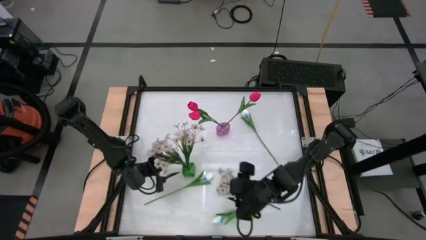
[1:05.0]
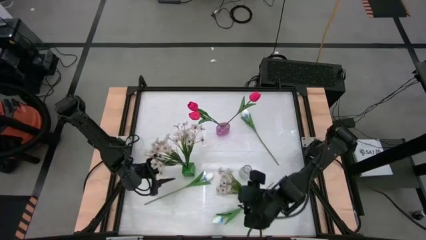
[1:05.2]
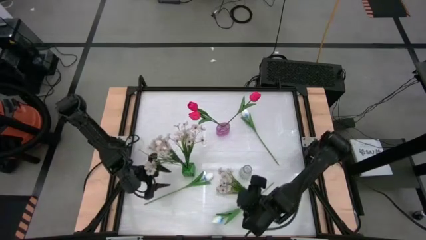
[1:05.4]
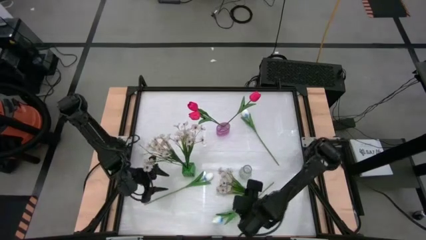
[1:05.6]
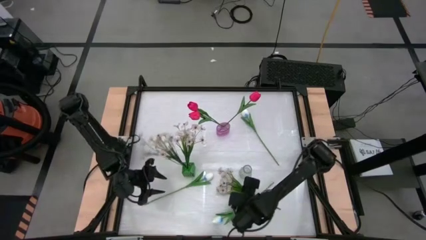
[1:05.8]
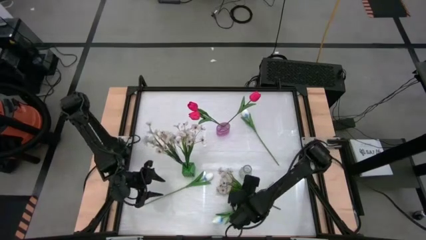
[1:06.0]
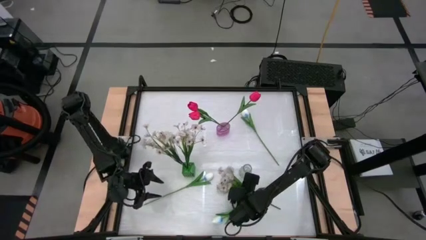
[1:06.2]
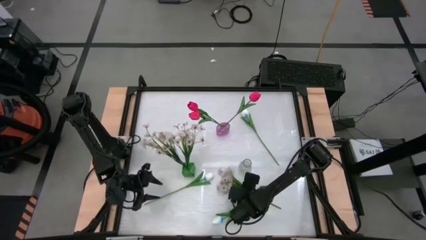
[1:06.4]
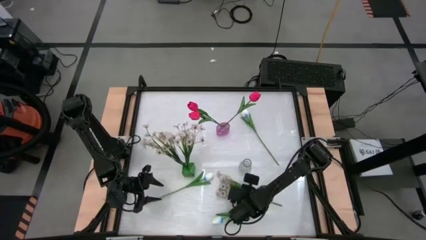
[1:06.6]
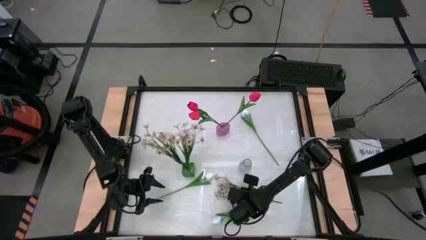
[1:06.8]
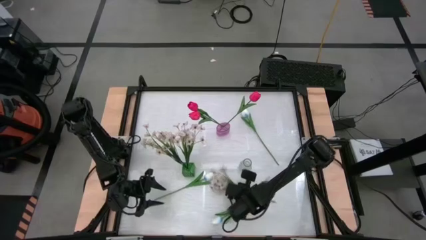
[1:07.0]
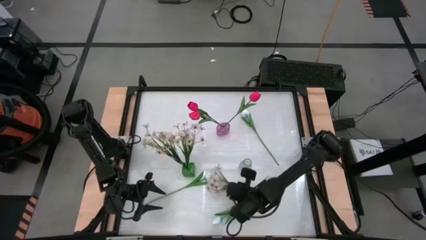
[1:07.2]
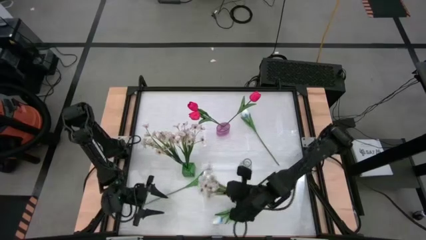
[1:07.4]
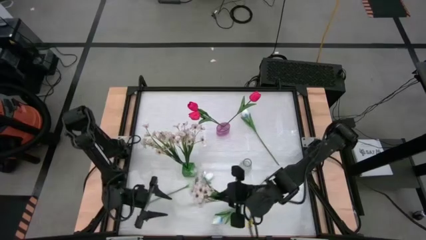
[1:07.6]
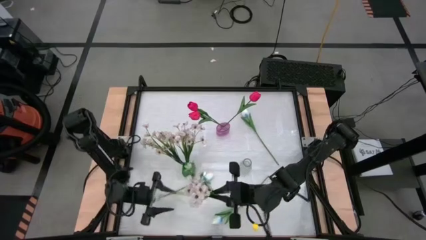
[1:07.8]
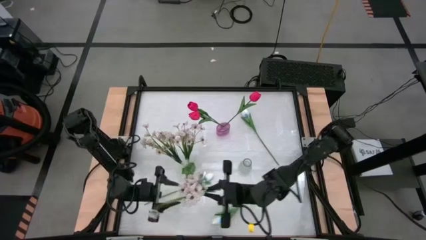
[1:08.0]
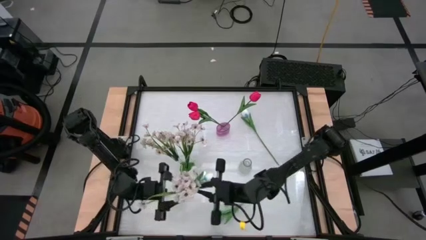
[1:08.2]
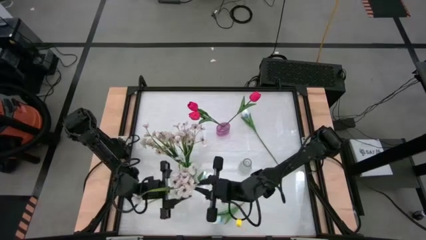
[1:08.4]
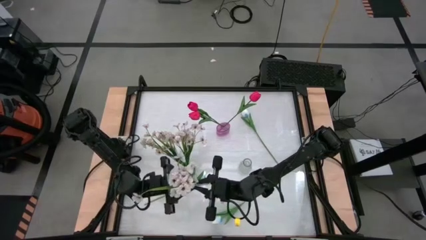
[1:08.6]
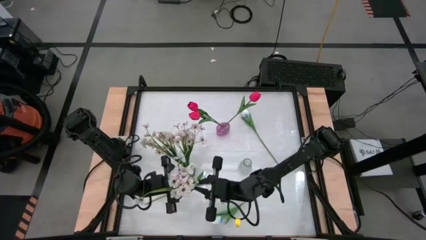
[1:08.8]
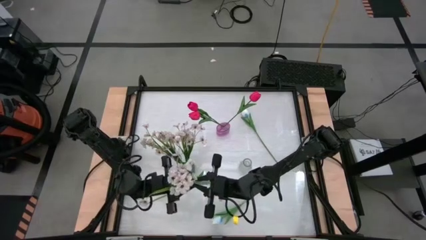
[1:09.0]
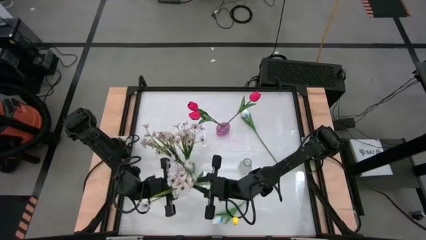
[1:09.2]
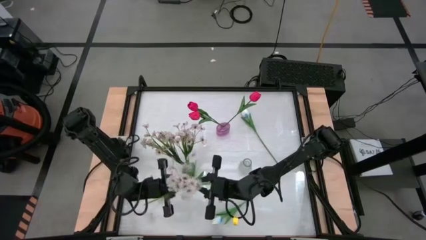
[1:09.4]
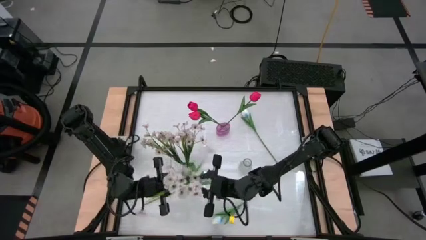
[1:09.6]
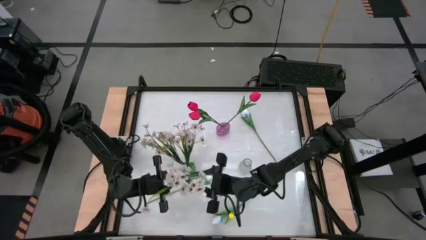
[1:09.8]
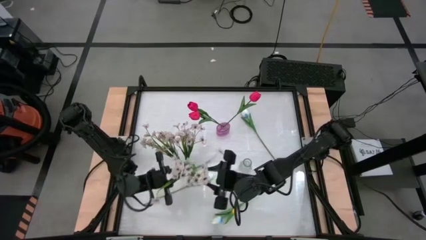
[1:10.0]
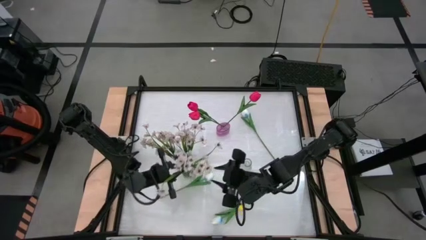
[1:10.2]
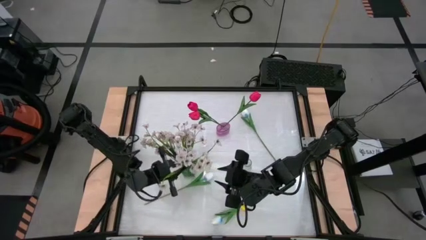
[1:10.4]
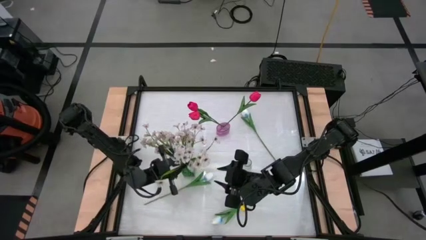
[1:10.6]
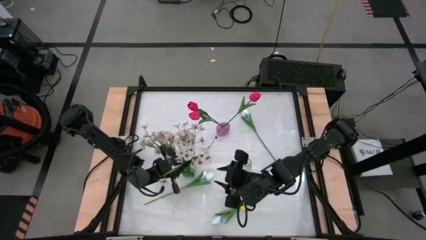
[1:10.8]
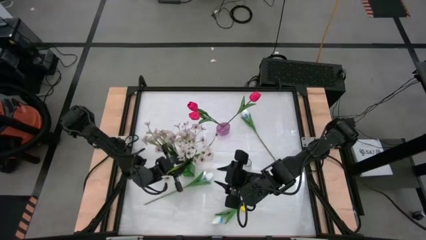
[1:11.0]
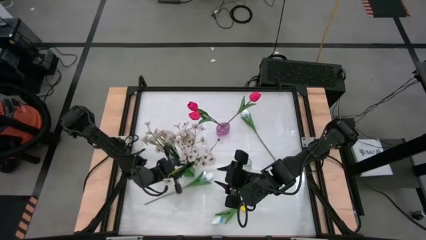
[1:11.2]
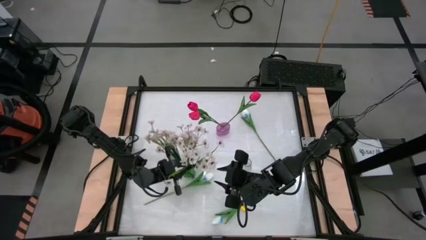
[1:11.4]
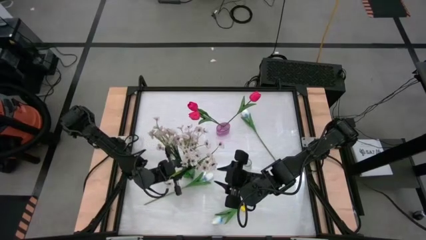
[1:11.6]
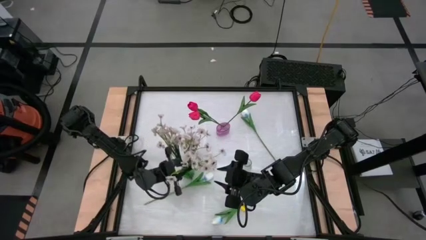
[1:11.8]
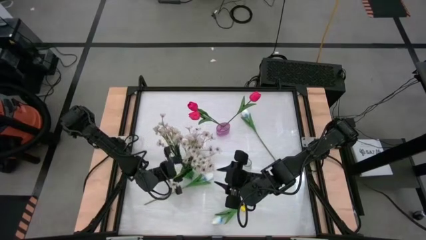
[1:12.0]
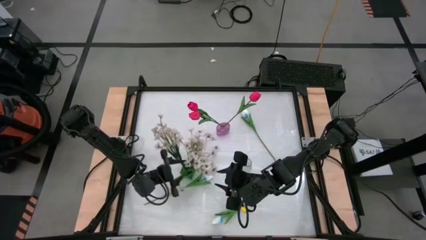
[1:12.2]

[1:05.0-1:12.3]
Task: Sort flowers into vase by color
Put the white flowers into the green vase

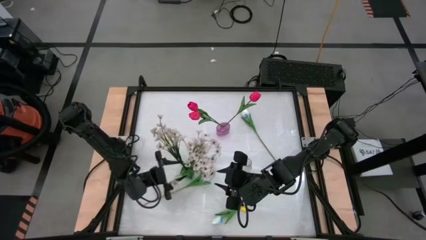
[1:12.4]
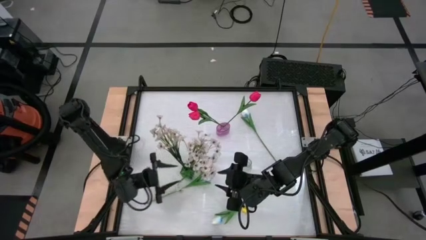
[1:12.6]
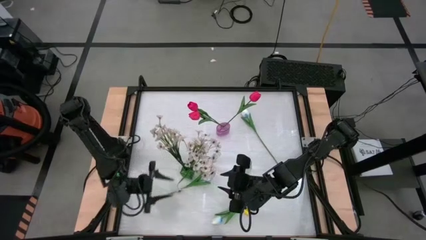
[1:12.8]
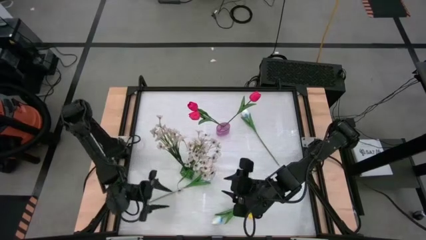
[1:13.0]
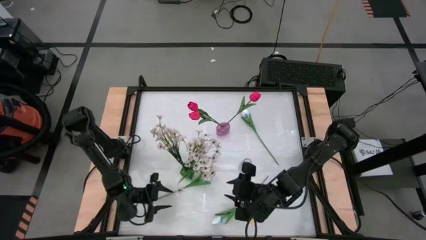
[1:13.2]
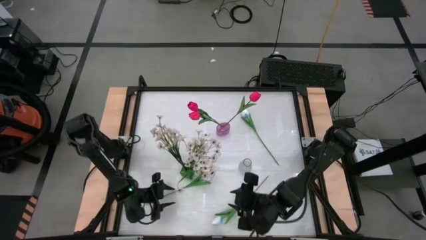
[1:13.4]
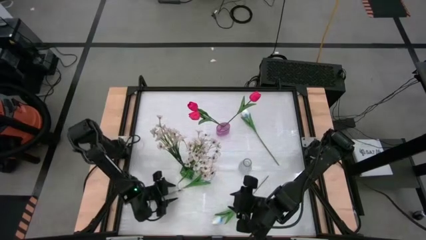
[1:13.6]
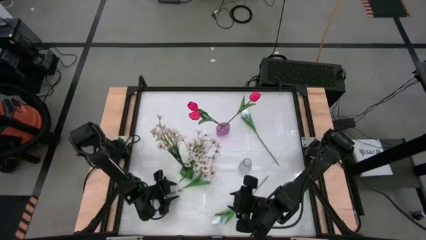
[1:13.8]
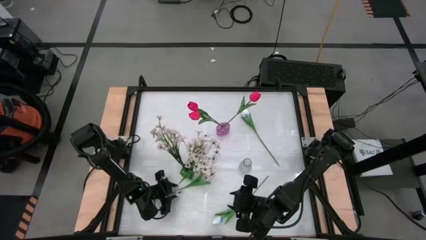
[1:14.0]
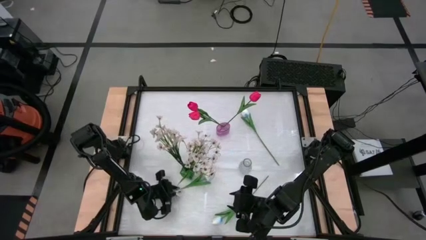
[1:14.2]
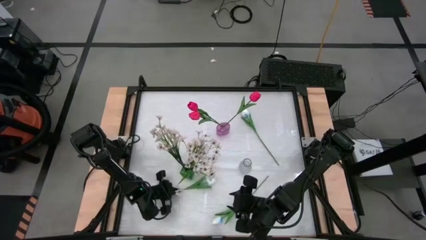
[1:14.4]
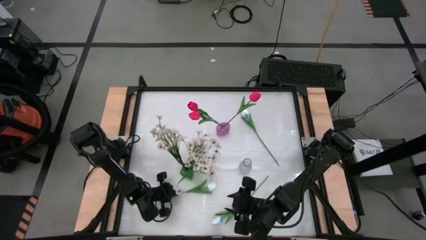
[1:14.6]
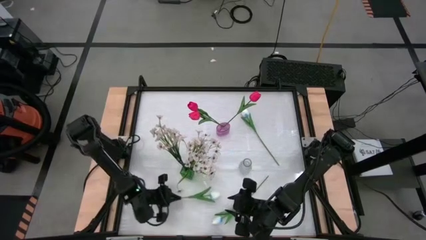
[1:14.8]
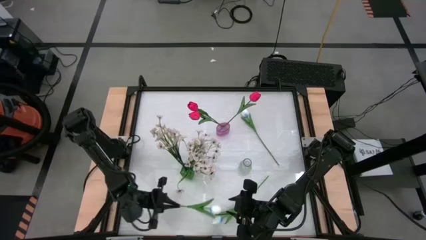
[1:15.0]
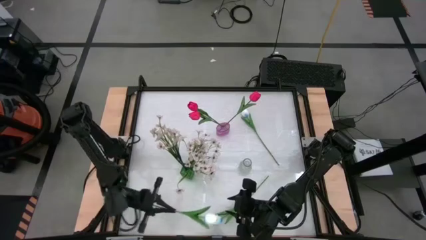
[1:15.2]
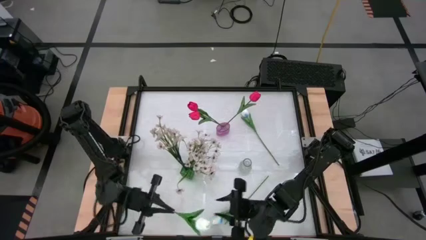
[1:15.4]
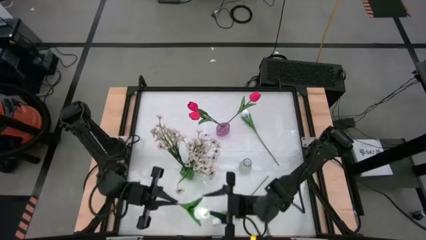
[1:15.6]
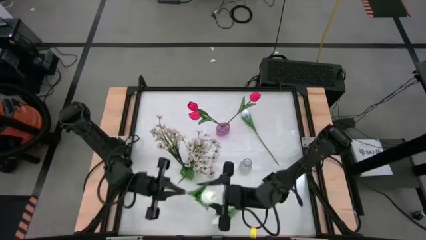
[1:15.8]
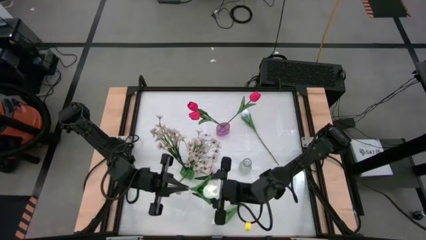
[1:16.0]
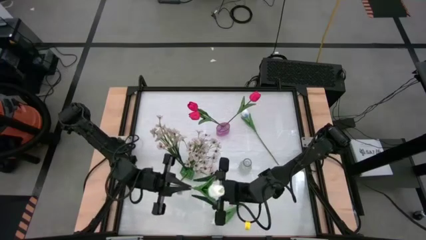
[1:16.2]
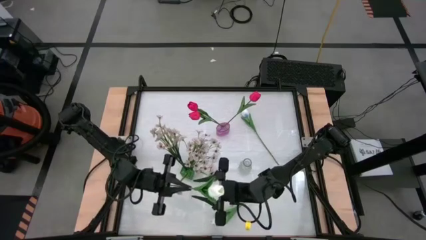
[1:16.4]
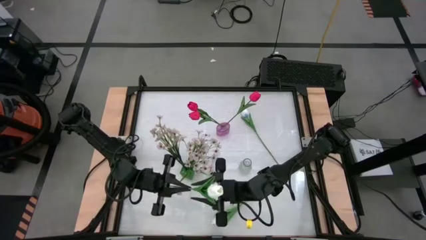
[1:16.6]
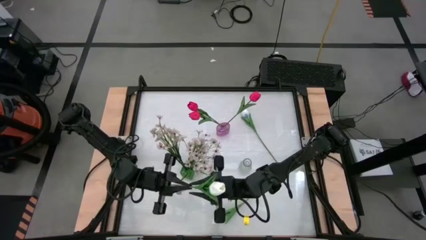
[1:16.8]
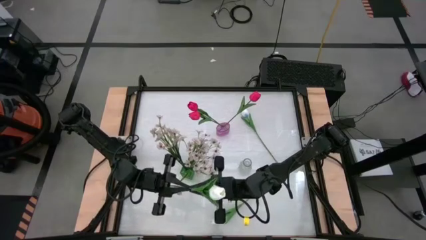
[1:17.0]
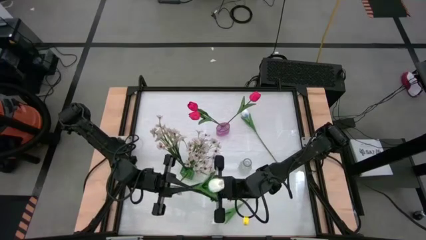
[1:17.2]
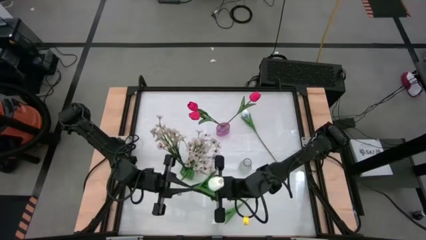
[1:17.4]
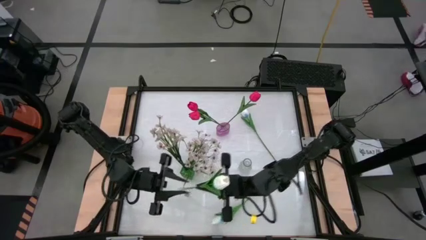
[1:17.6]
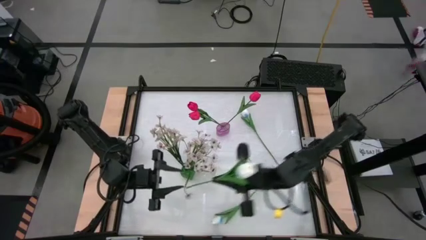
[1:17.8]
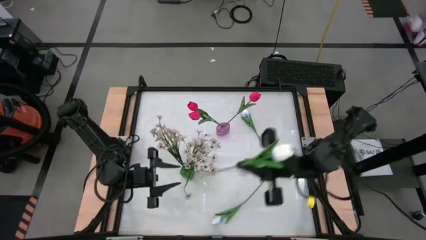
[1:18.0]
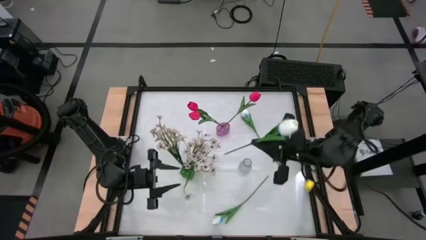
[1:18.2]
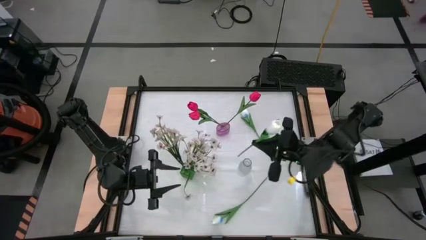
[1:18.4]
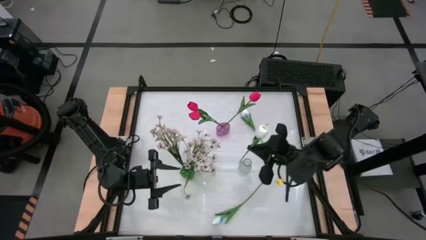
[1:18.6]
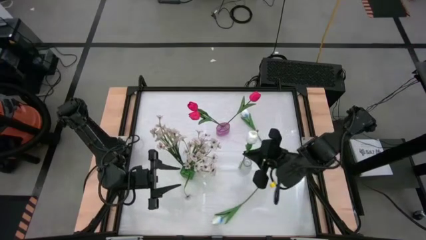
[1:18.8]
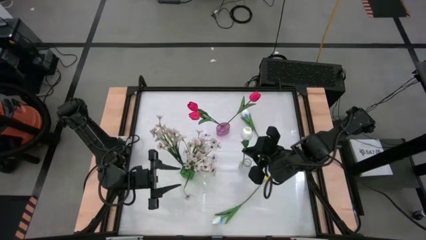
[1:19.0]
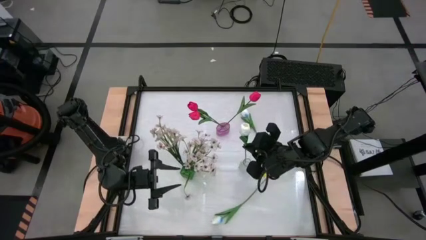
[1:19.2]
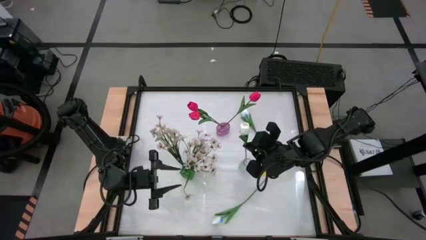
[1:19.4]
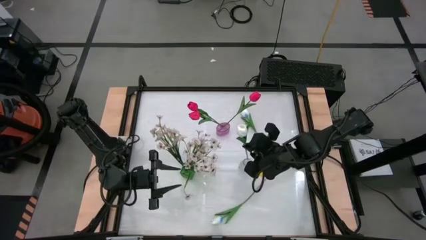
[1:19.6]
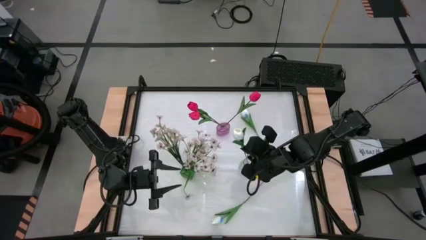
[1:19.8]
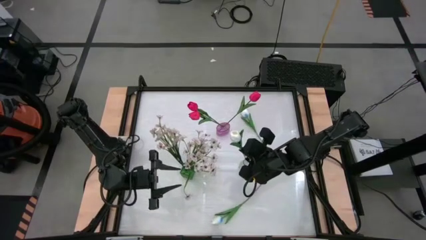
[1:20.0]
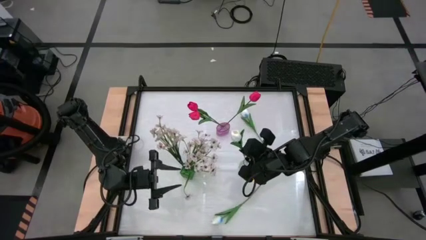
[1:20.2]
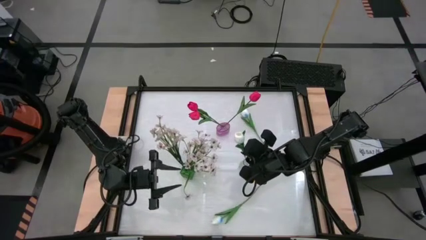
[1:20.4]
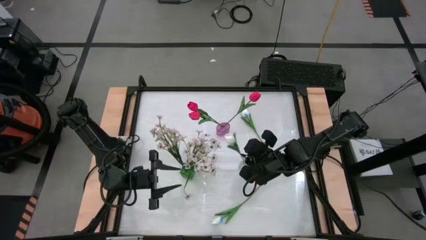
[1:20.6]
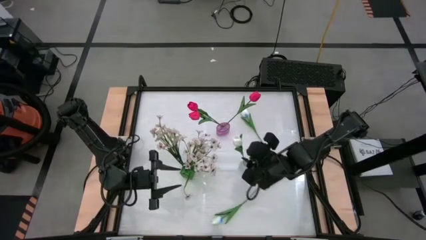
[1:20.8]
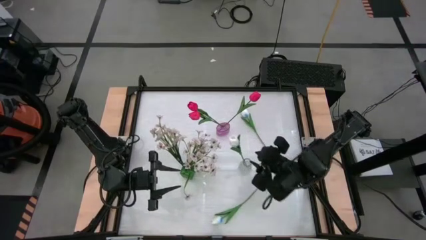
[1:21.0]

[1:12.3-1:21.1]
Put the middle left white flower into the transparent vase

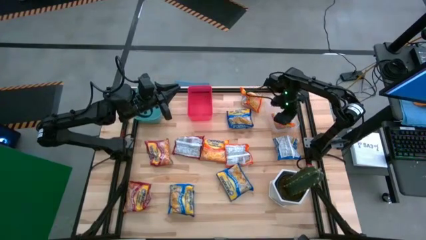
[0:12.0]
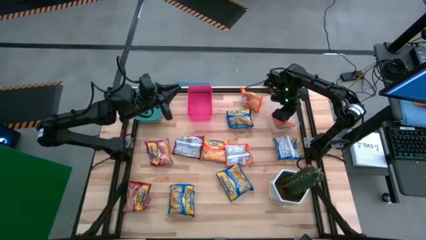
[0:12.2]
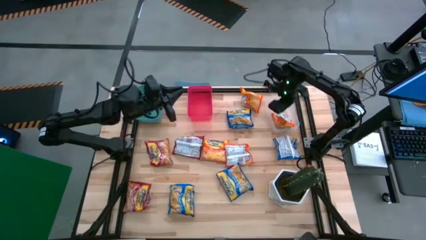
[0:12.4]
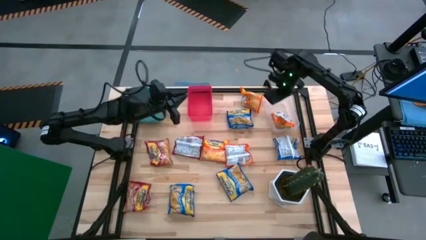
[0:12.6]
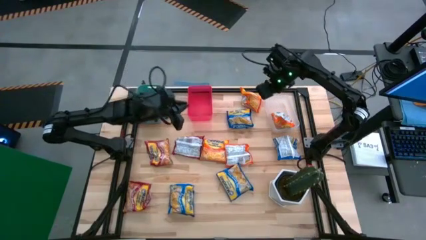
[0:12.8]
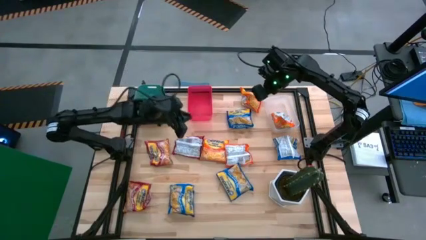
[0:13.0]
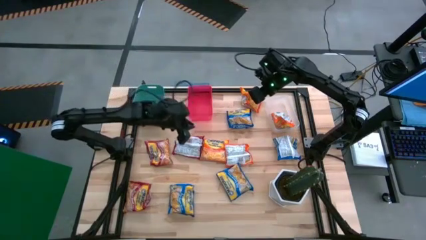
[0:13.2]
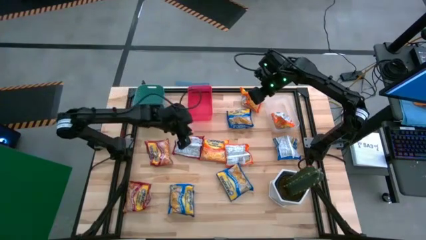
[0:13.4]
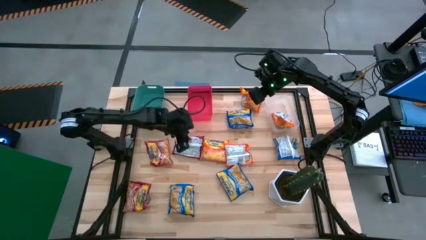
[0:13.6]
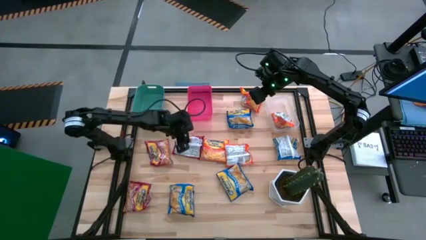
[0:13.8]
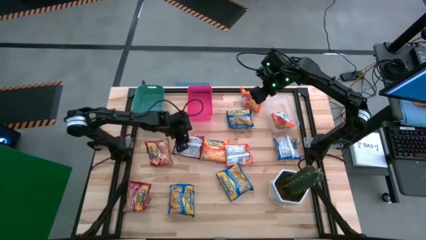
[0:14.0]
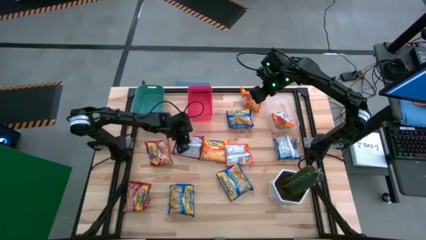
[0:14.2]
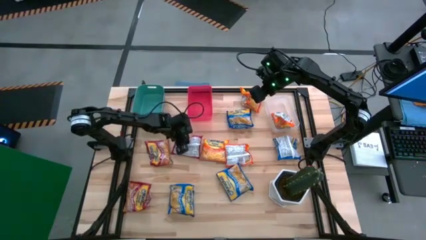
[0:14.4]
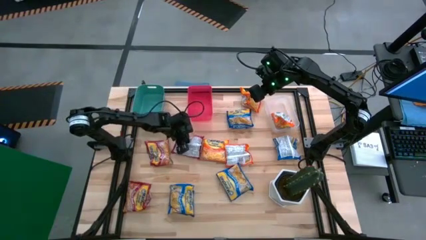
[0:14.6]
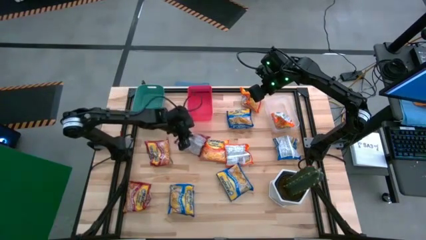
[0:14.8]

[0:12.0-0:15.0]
Task: Sort Maruchan noodles
Put the red noodle pack into the red bin
